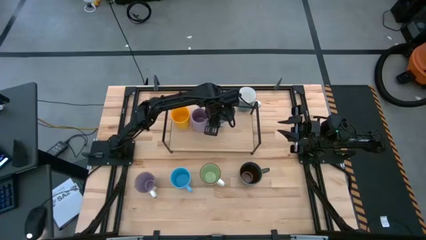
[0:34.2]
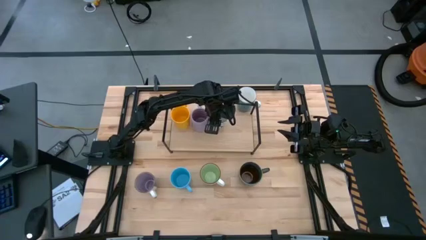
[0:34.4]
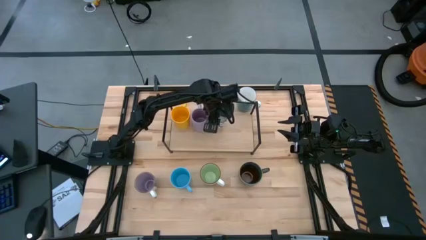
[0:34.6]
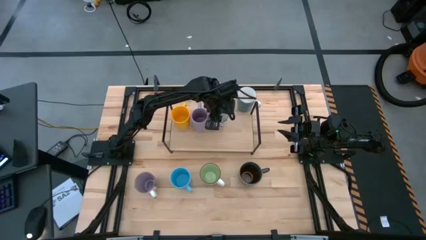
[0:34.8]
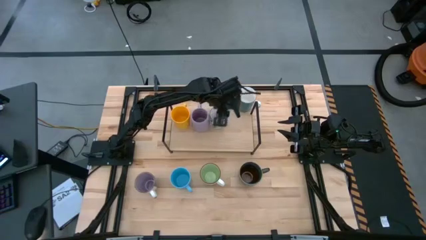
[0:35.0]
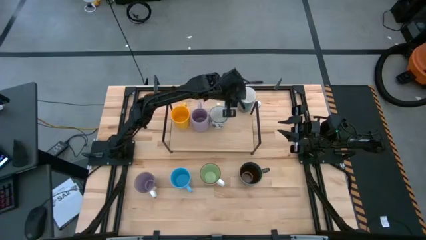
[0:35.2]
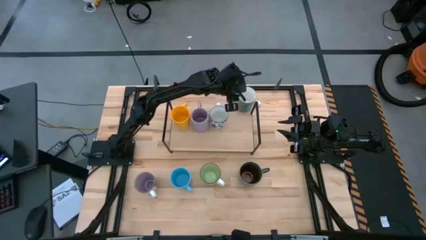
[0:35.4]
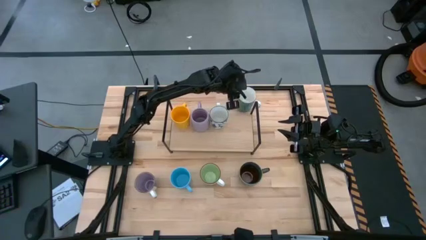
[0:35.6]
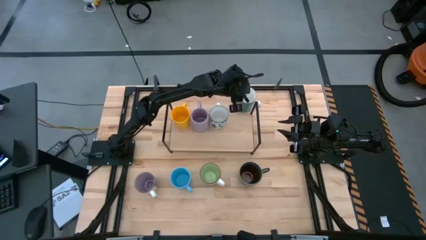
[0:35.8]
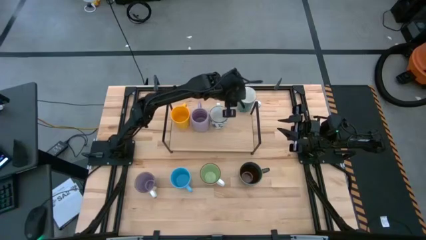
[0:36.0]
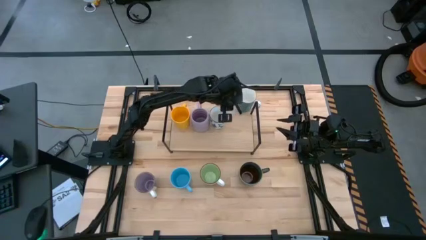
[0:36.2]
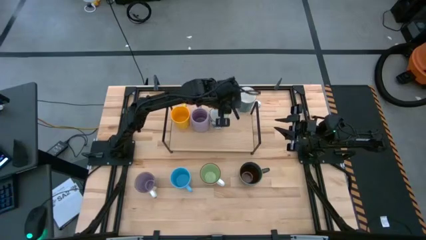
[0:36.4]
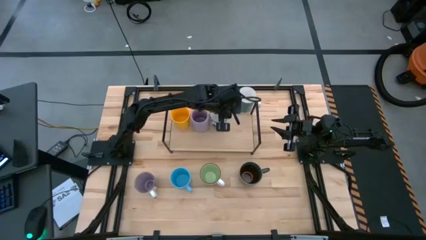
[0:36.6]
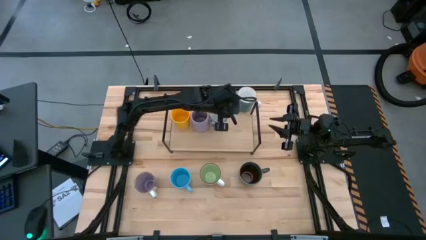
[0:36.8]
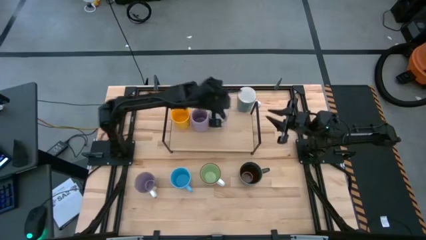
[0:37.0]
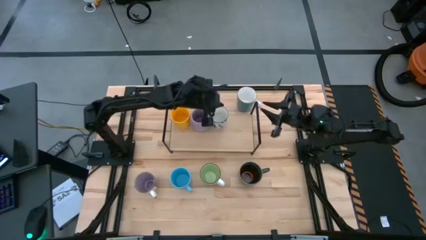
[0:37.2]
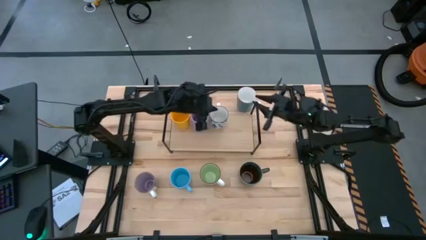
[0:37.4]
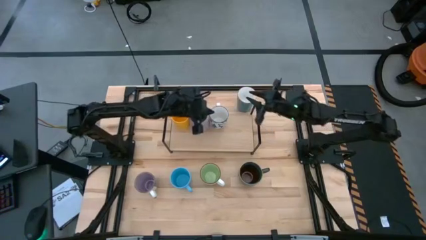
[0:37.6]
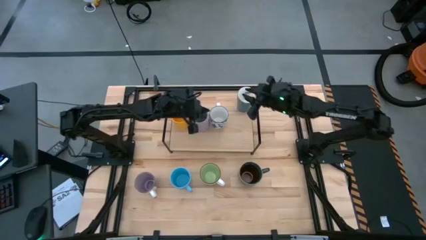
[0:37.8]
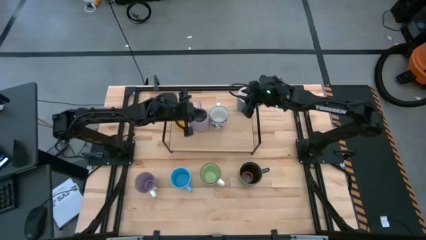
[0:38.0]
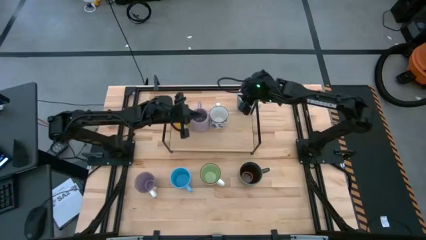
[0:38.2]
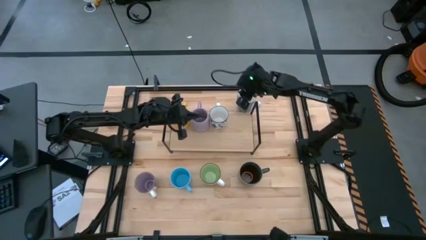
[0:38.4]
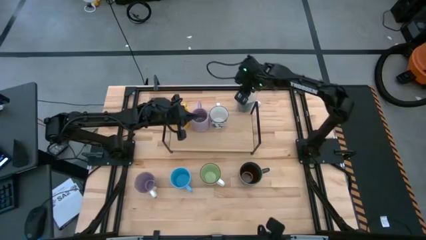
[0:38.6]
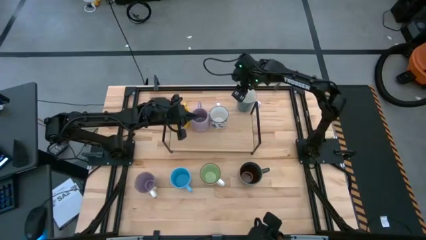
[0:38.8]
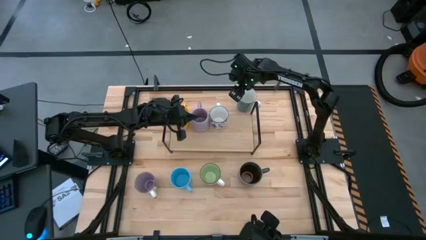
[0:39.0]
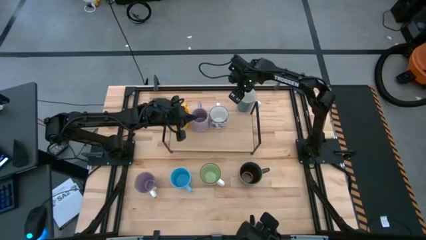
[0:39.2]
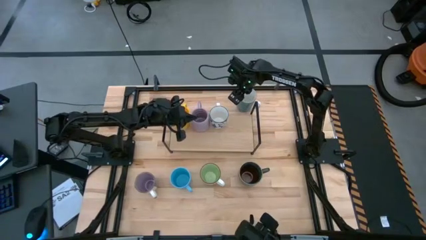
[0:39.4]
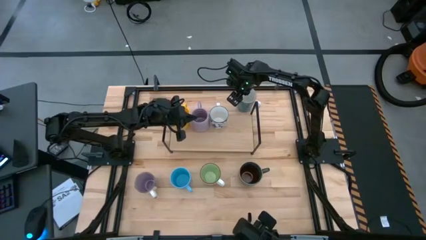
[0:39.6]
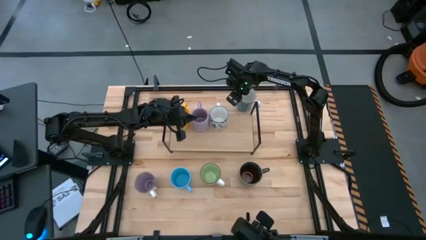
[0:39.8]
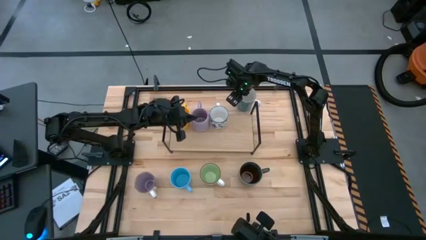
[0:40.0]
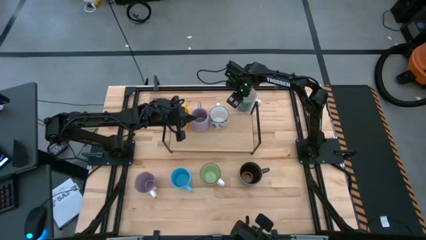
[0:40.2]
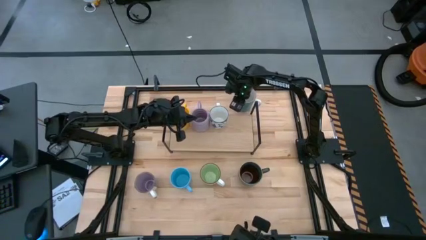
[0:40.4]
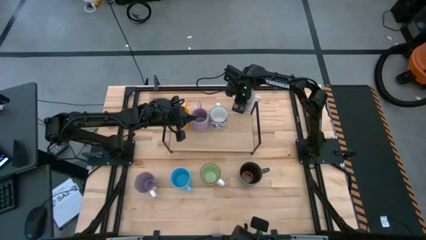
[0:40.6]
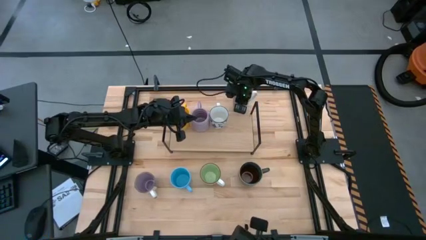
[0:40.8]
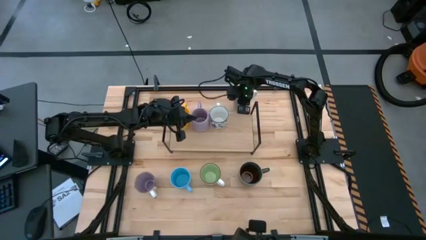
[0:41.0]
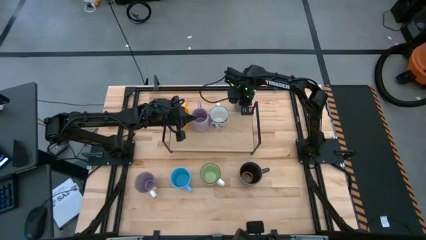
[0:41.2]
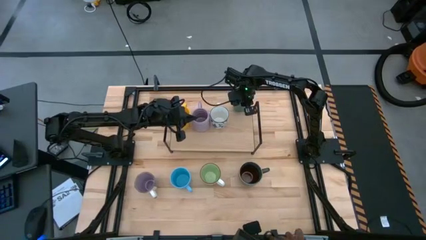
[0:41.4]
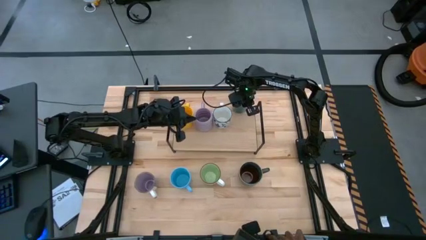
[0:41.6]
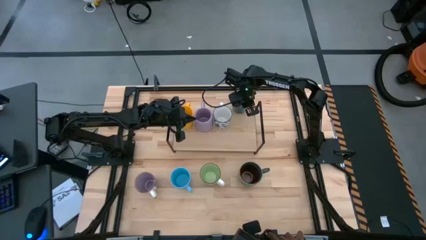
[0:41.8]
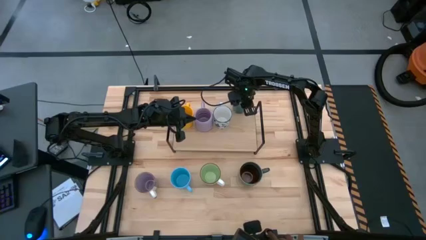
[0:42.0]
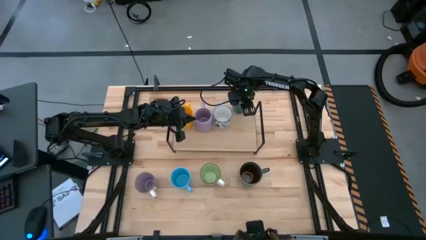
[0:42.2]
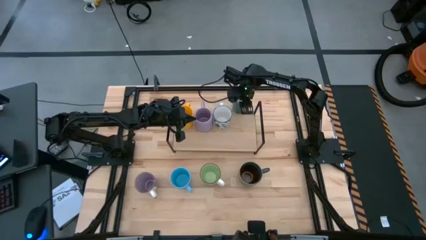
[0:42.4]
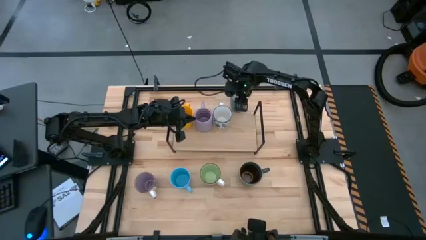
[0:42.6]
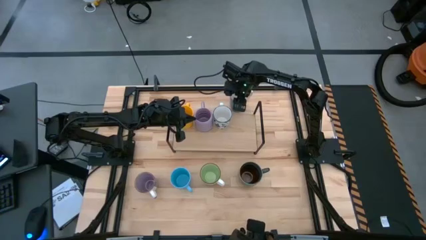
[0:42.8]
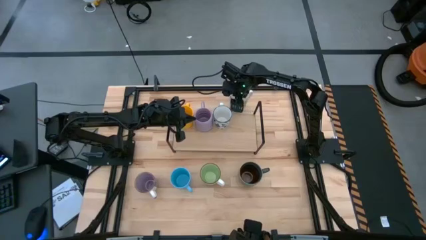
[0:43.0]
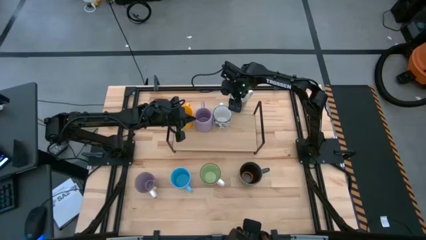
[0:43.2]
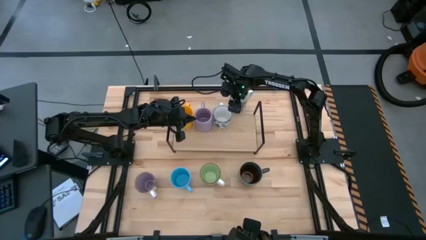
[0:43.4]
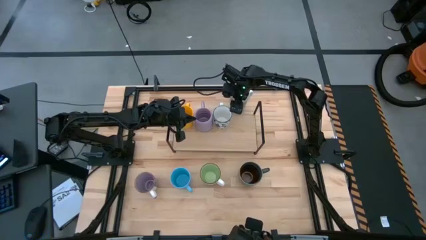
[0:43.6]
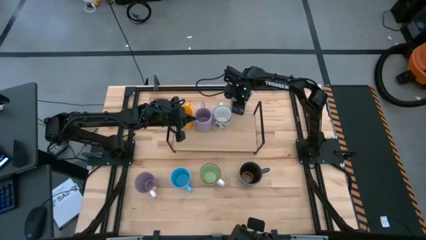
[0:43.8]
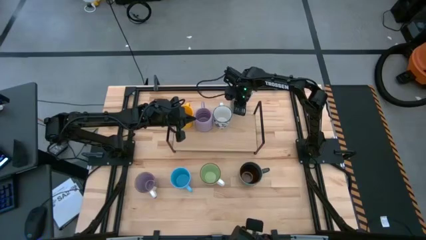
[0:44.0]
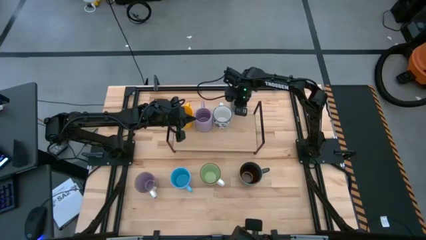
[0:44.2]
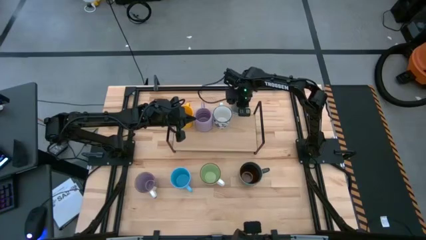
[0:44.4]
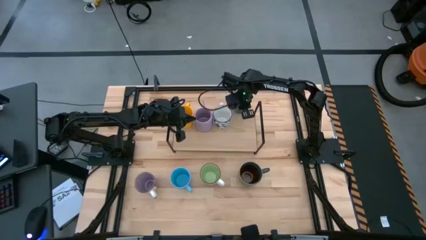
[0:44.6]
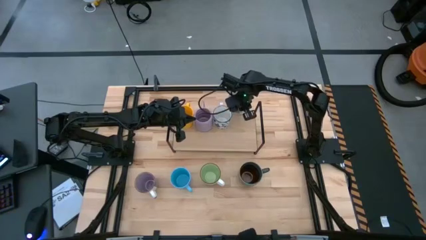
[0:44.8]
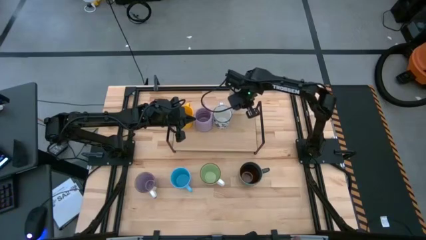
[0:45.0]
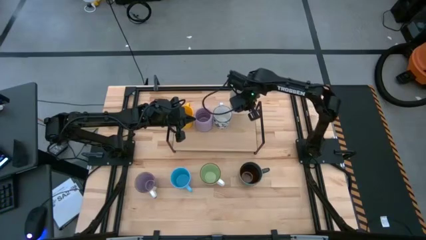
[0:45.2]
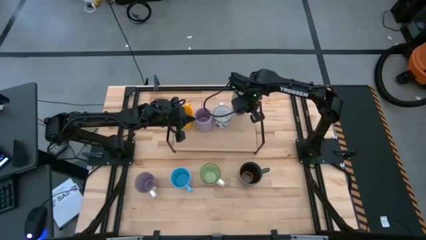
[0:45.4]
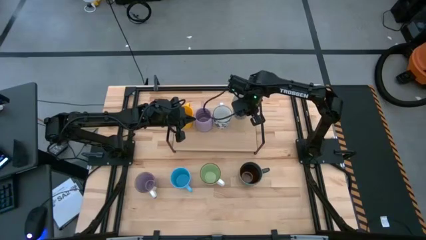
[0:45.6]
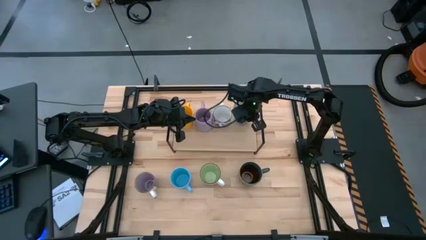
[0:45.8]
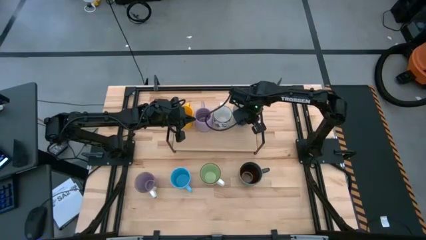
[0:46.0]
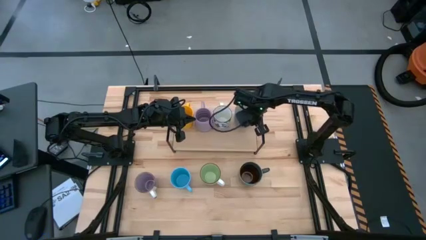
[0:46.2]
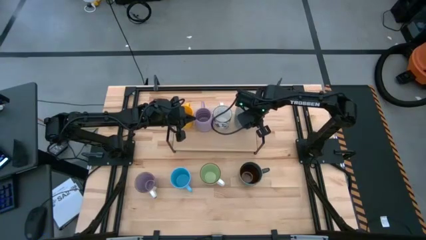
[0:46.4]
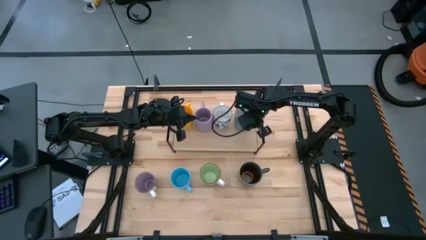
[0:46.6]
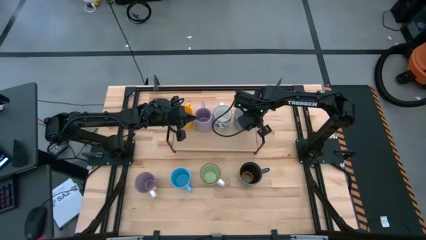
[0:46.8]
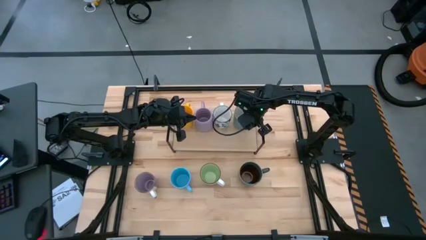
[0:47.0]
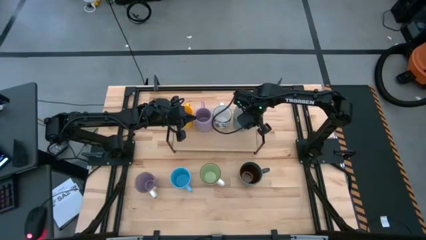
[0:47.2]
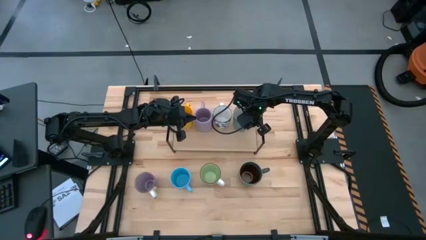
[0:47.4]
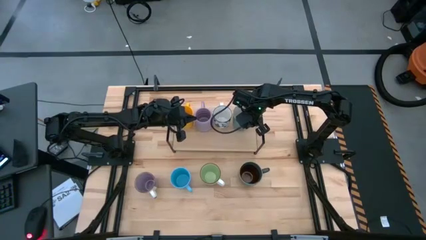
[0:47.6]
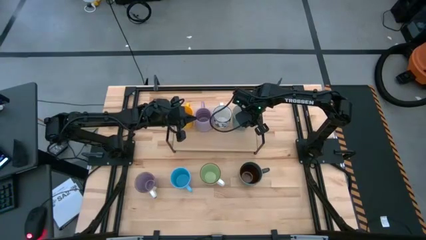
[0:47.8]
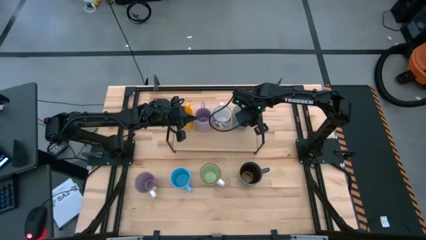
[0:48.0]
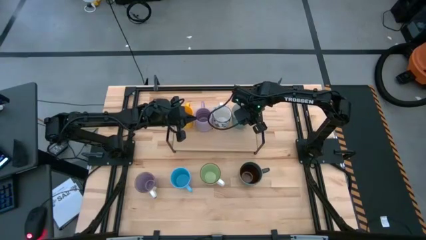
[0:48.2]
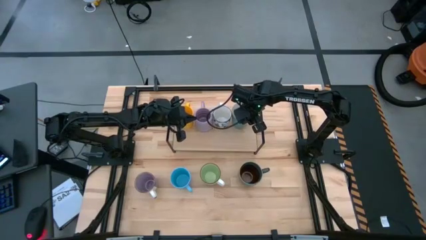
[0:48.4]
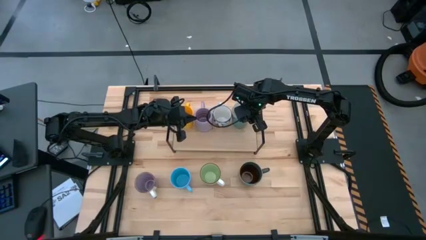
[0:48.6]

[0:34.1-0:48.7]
Task: Place coffee mugs
Put the light blue mug on the shelf

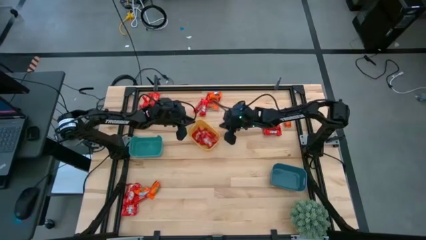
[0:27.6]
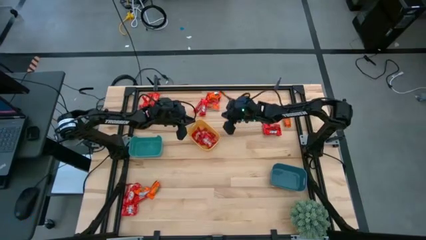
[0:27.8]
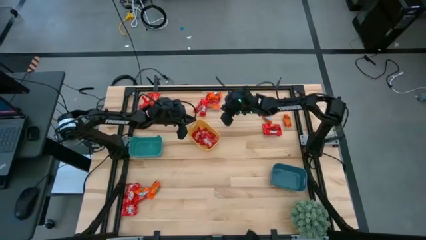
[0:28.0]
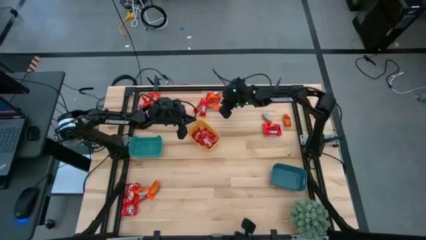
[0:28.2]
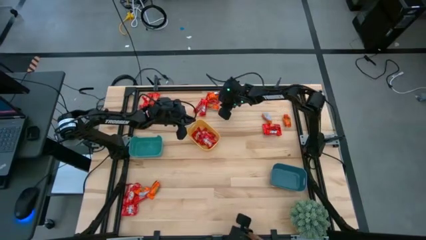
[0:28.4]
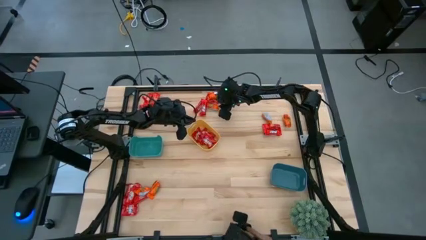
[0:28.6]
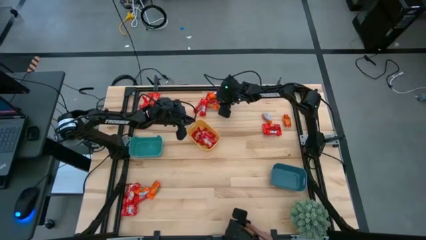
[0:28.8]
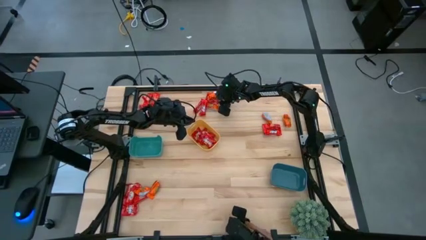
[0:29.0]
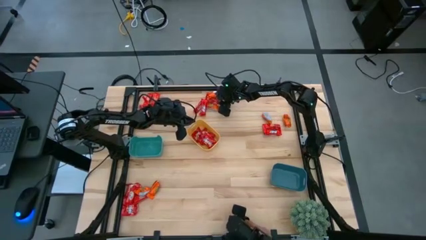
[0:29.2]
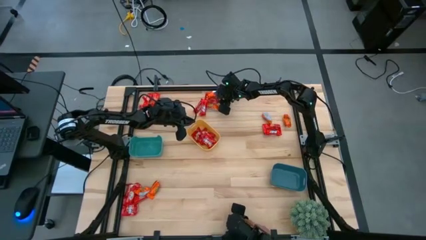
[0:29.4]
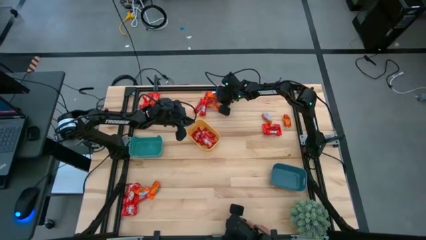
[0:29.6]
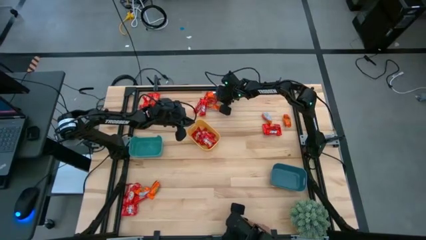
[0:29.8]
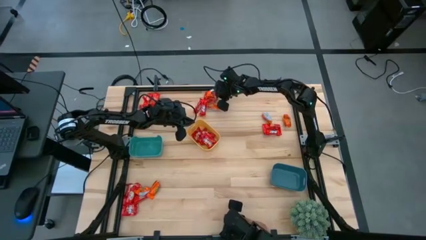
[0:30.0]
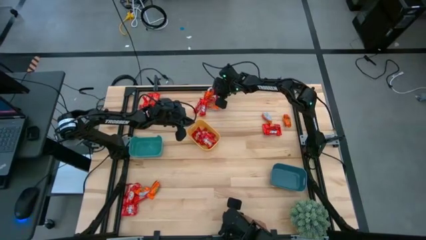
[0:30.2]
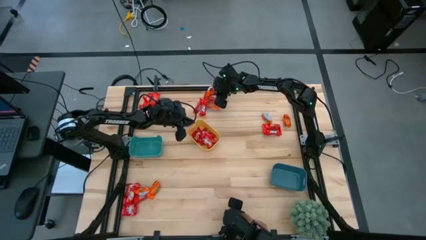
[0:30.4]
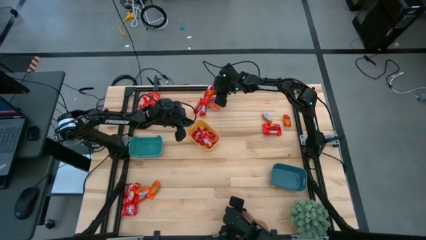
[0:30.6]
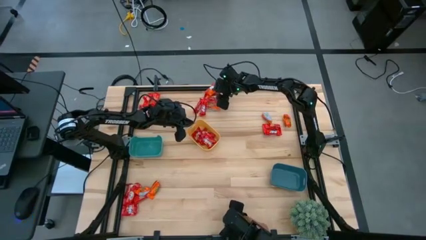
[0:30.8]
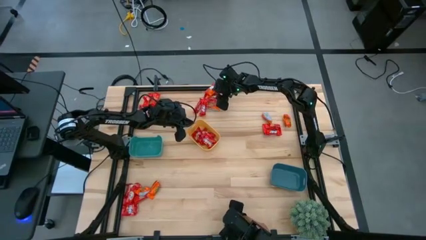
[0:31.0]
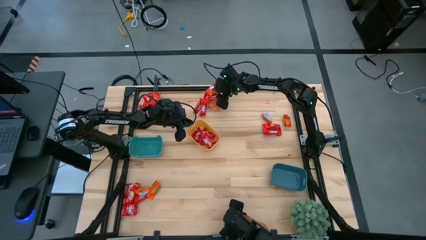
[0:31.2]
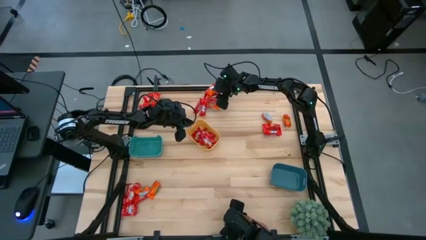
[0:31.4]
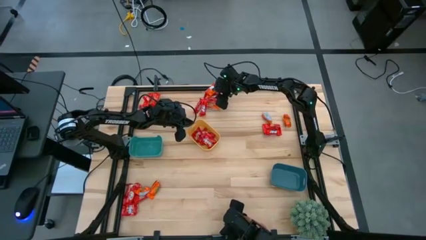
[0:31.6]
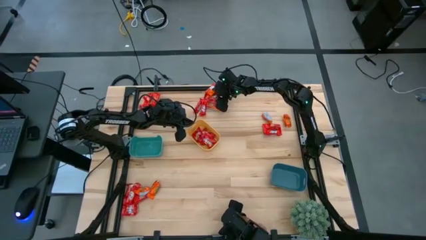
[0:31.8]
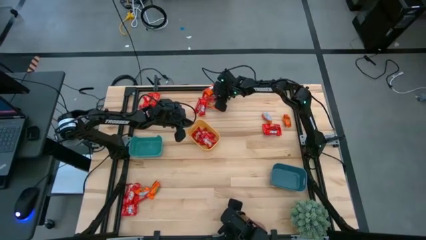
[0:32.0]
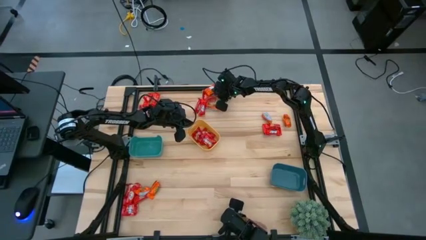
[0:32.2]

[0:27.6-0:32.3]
Task: Sort candy
Put the red candy into the yellow bin
